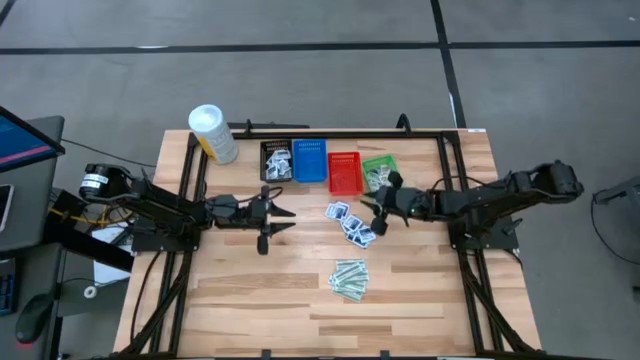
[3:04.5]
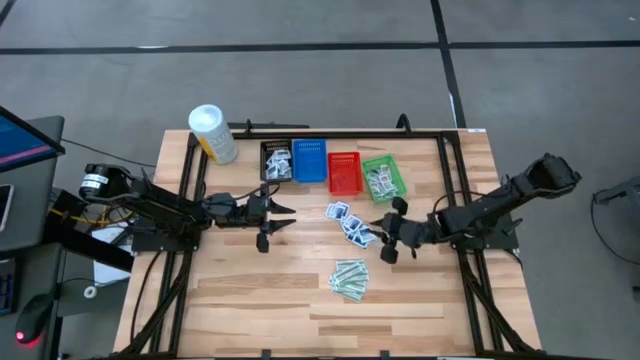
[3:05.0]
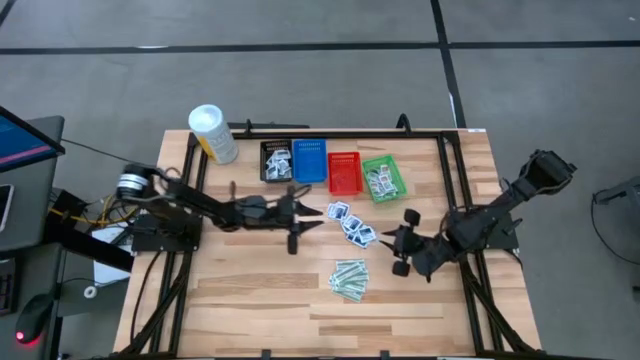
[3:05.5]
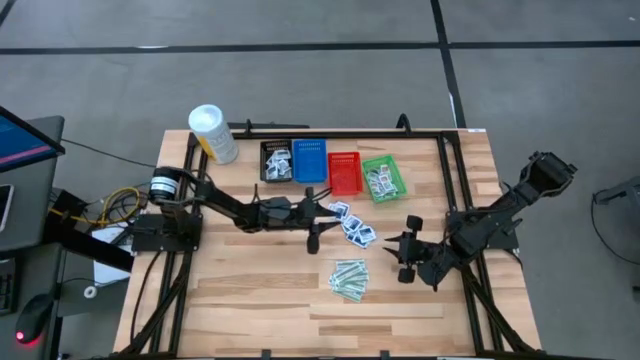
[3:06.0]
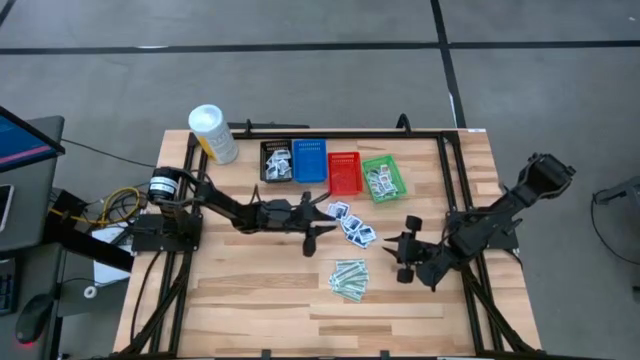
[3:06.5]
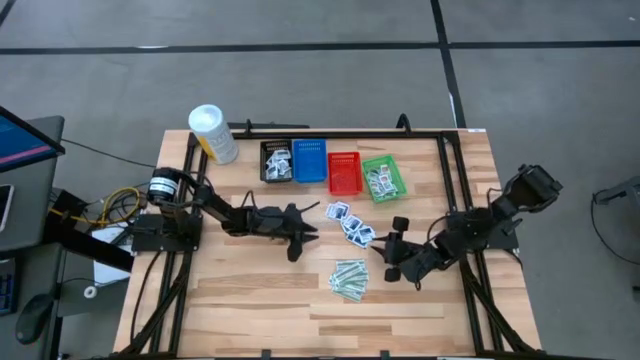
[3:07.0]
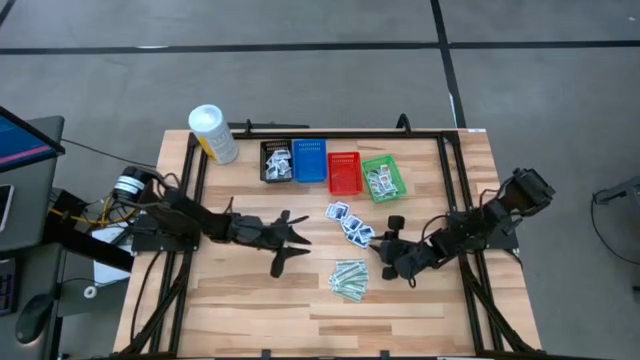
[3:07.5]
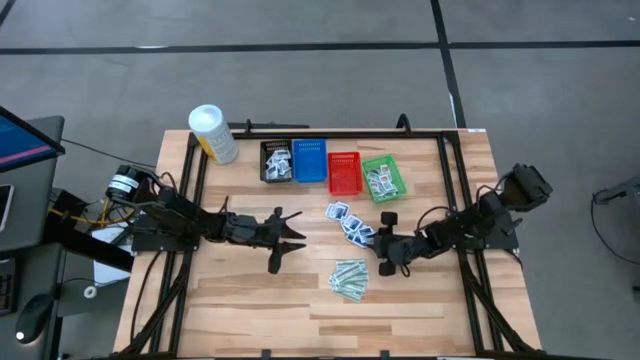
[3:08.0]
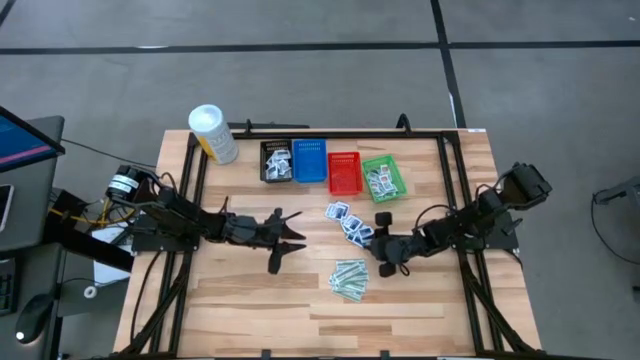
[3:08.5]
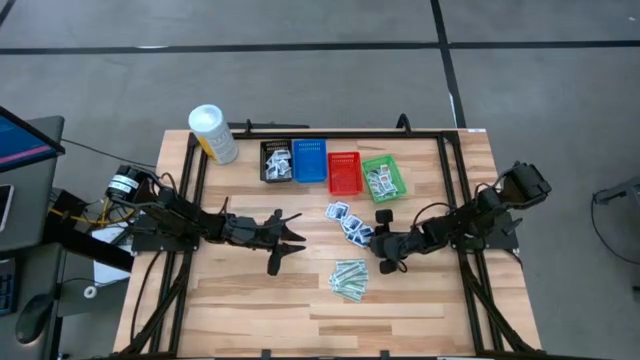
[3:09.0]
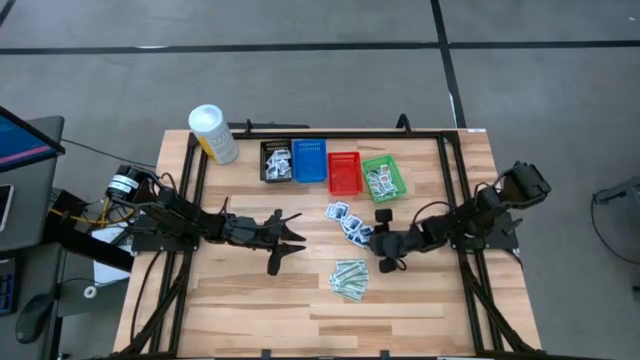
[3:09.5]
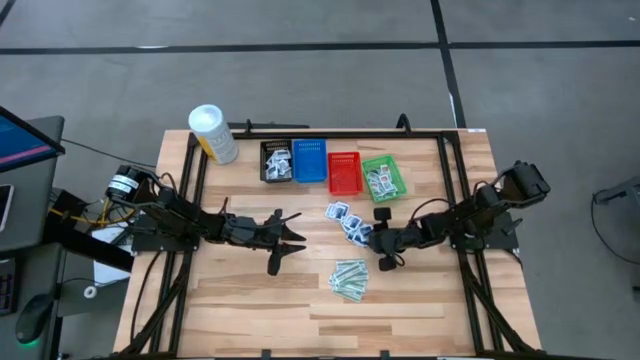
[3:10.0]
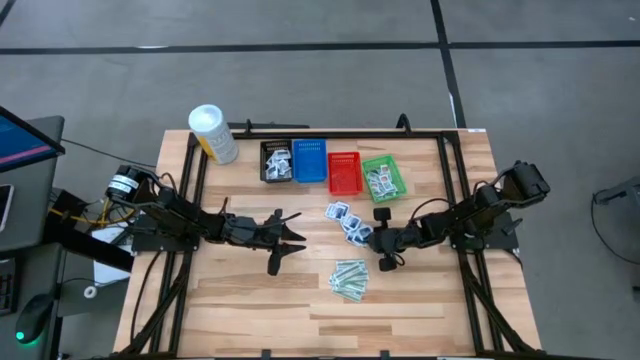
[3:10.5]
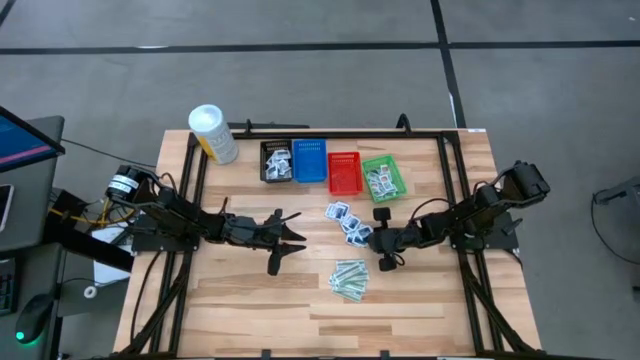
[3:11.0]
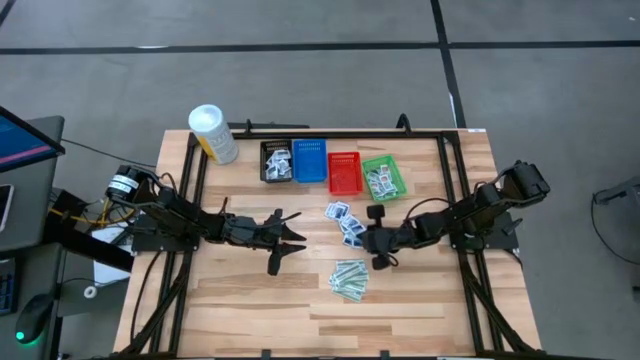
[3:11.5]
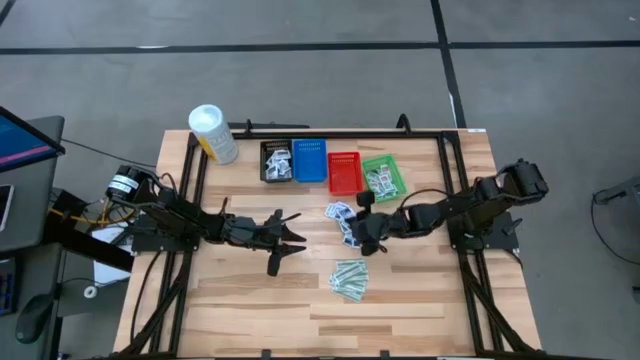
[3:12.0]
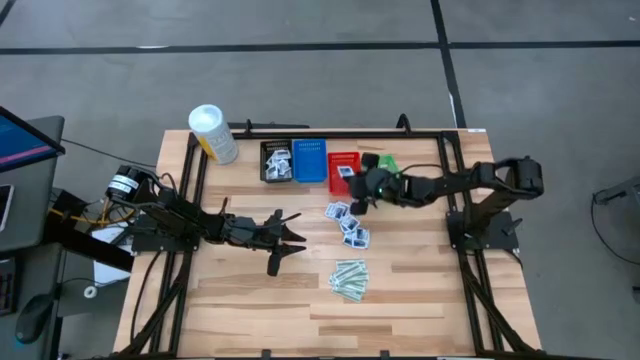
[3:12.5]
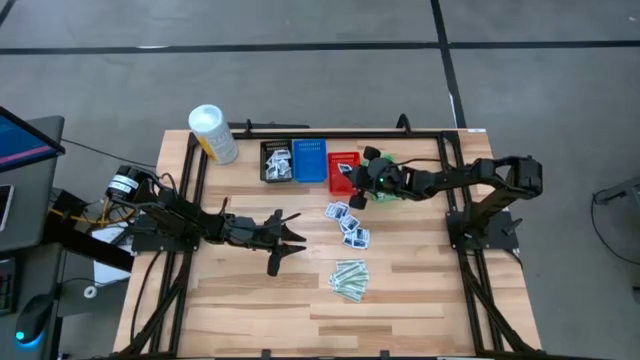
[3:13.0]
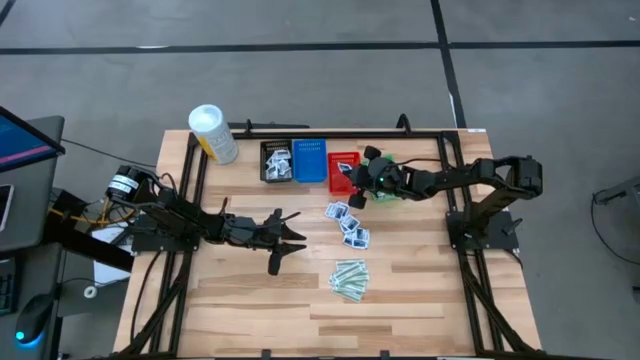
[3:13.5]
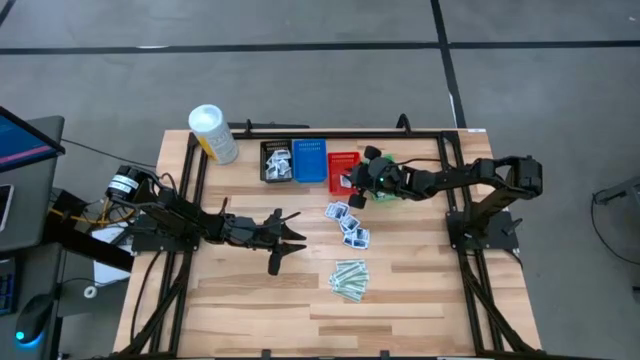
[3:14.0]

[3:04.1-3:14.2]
Task: Pick & Place First Aid Supplies
Put the blue pad into the red bin

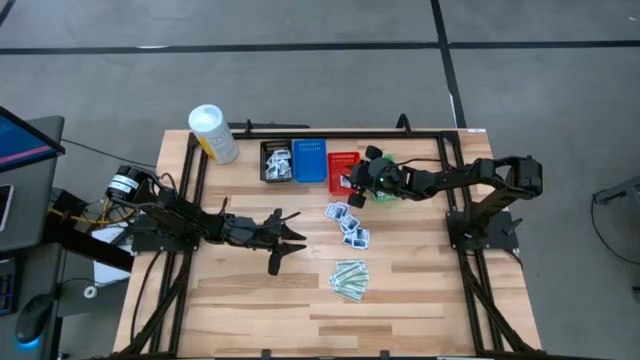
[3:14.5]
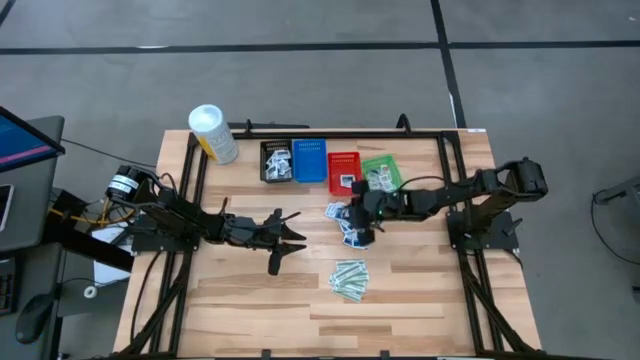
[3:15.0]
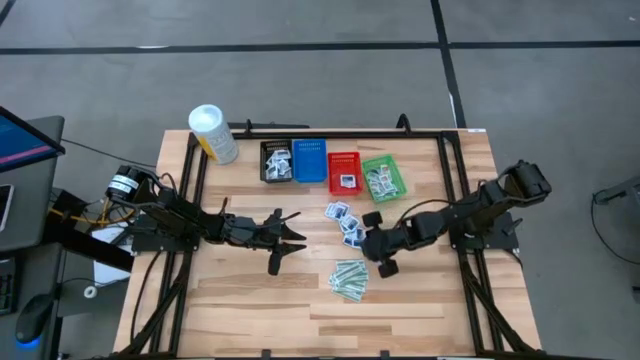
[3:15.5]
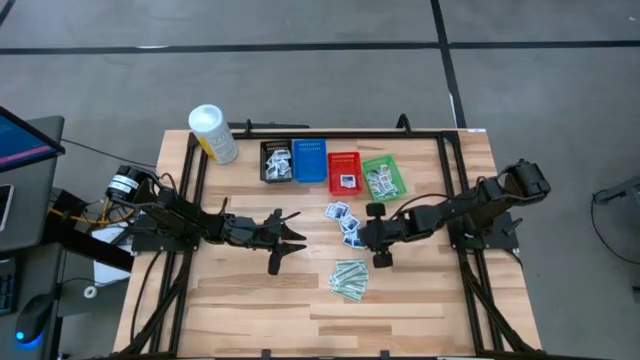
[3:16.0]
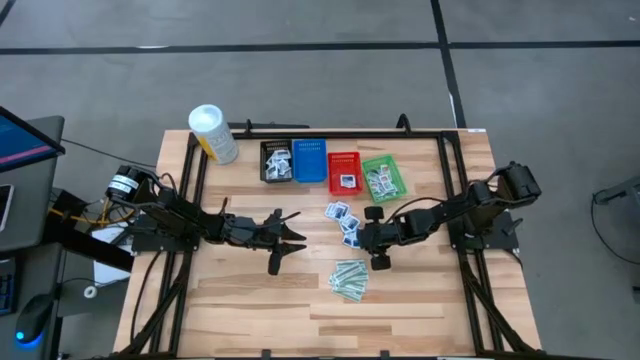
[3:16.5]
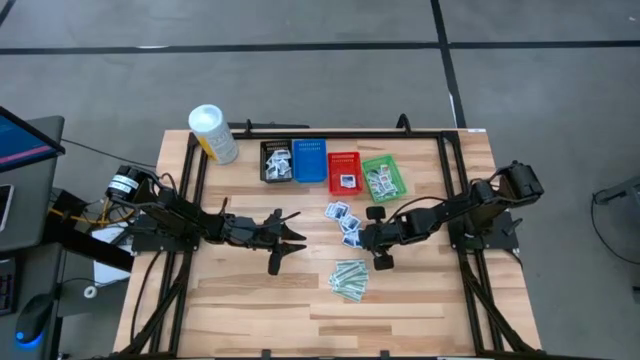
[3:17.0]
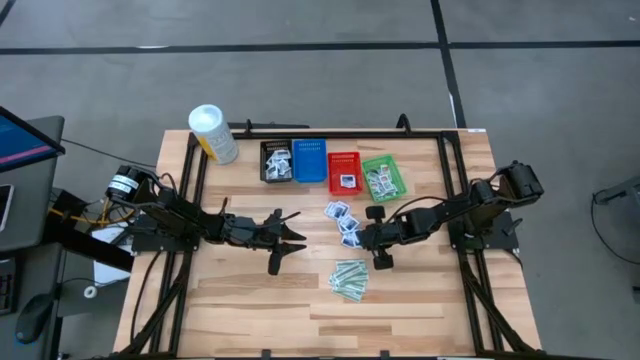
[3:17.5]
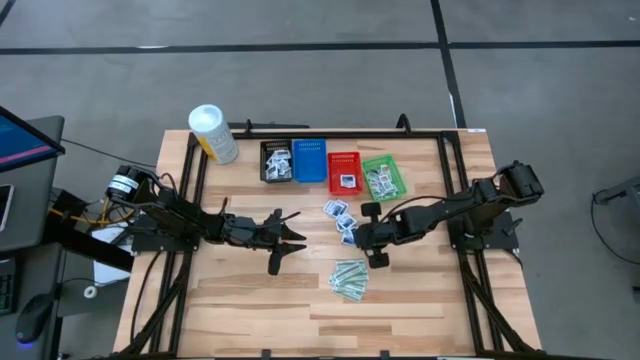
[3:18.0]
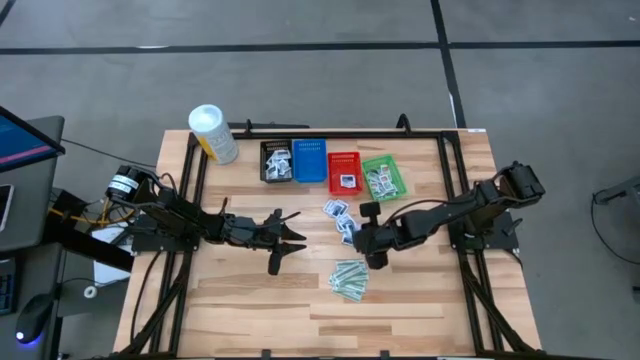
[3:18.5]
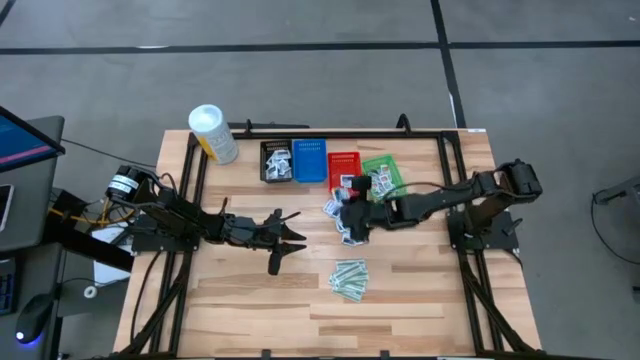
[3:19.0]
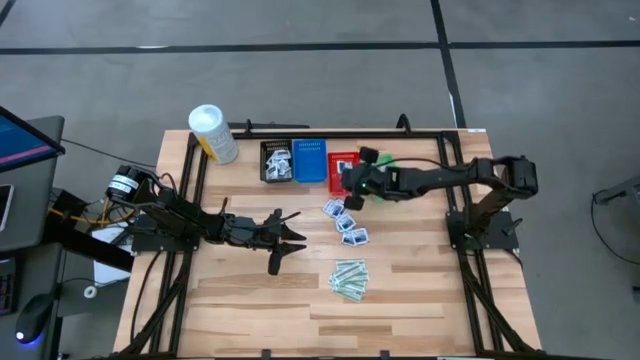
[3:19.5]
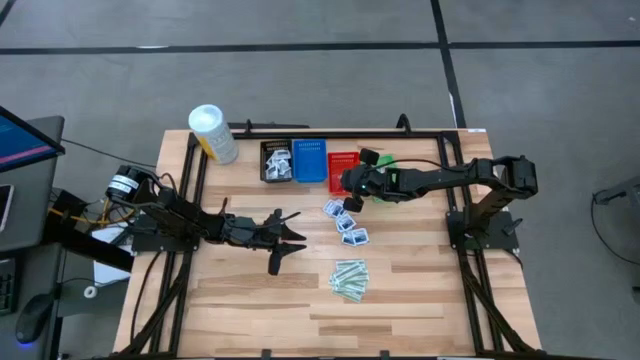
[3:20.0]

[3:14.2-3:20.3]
Put the blue pad into the red bin
